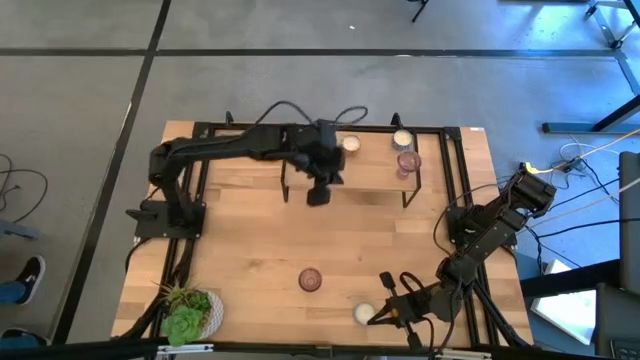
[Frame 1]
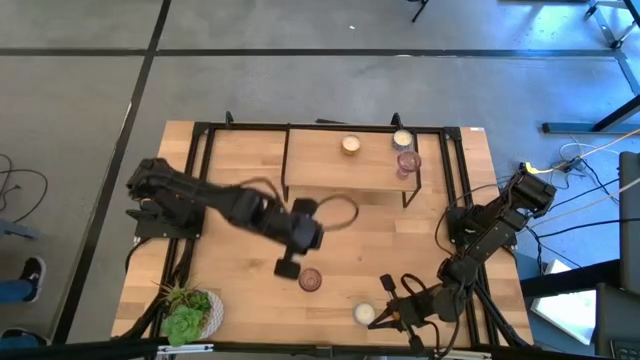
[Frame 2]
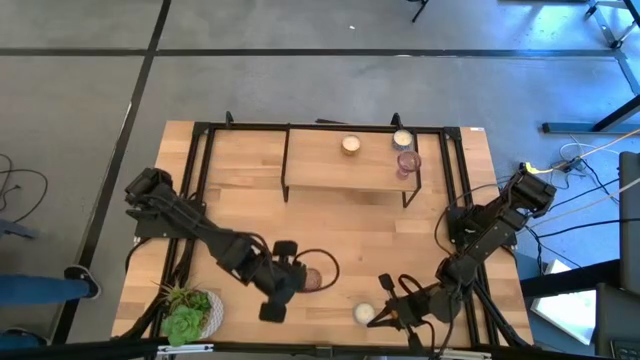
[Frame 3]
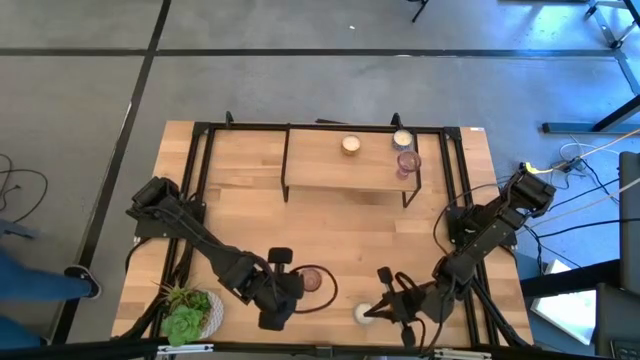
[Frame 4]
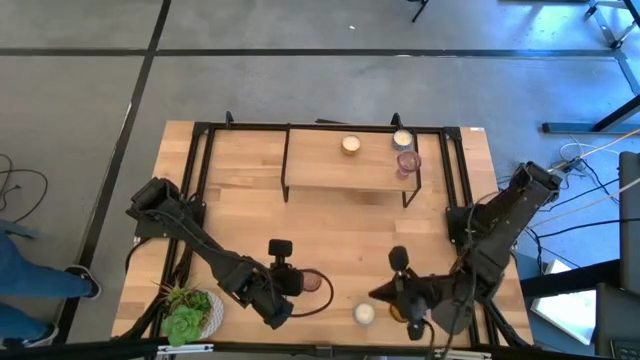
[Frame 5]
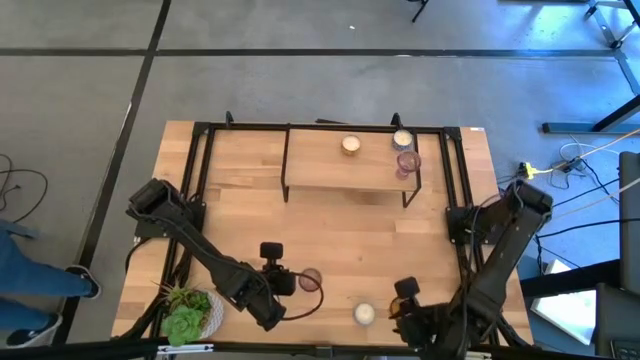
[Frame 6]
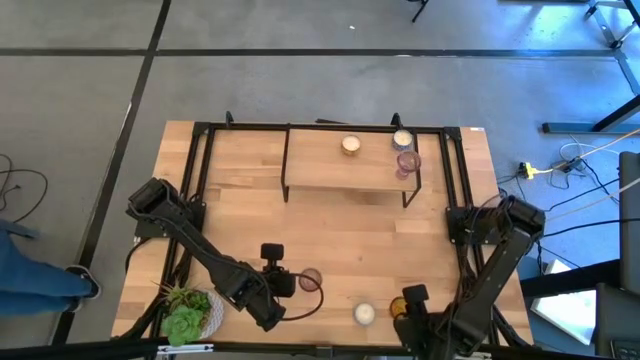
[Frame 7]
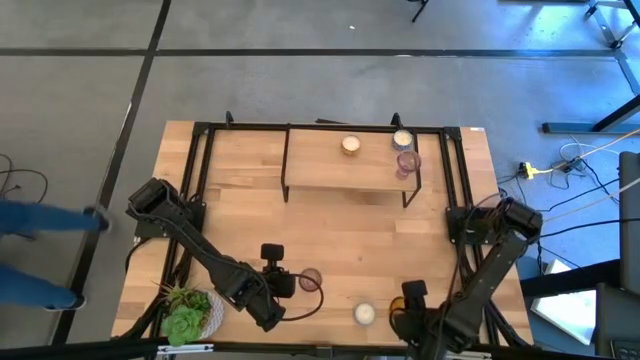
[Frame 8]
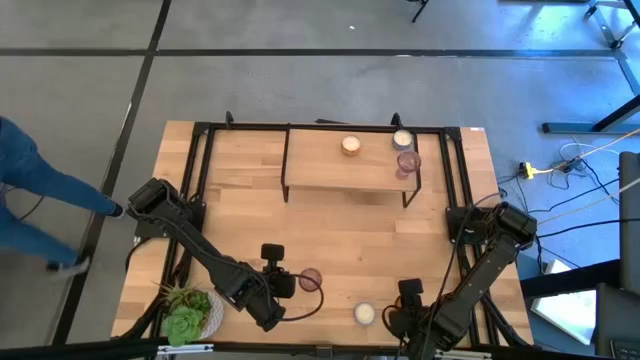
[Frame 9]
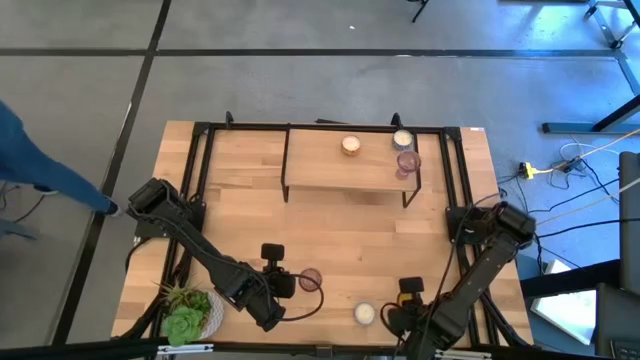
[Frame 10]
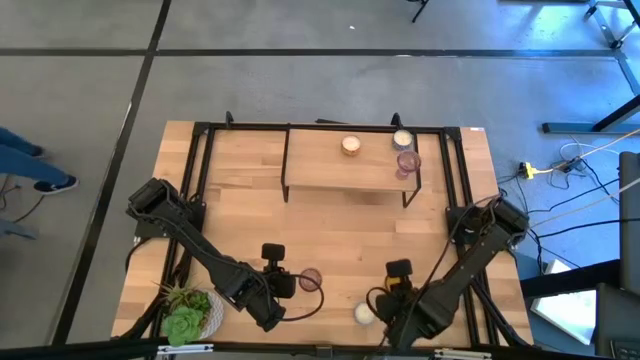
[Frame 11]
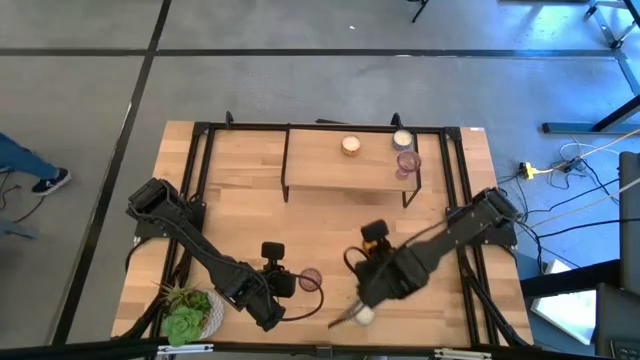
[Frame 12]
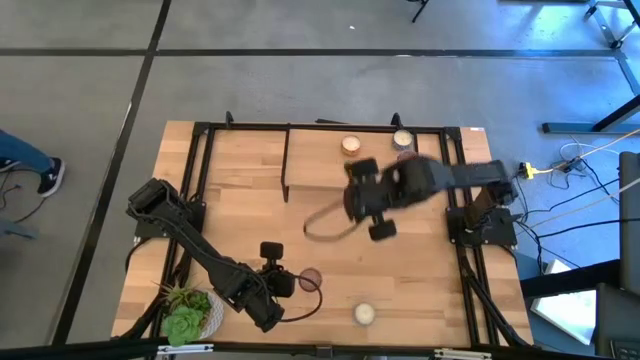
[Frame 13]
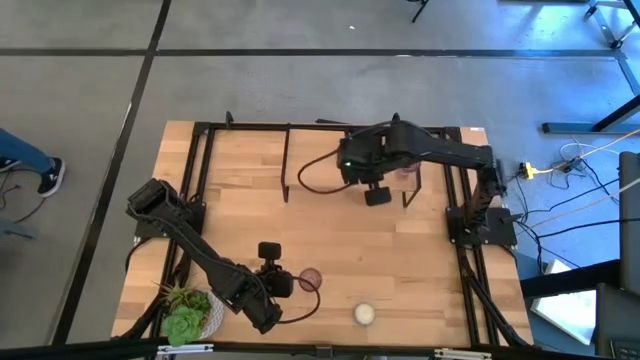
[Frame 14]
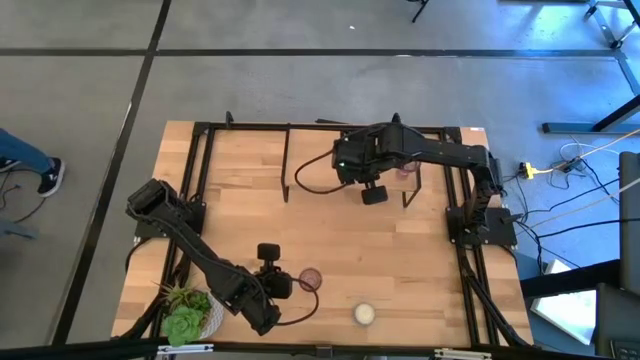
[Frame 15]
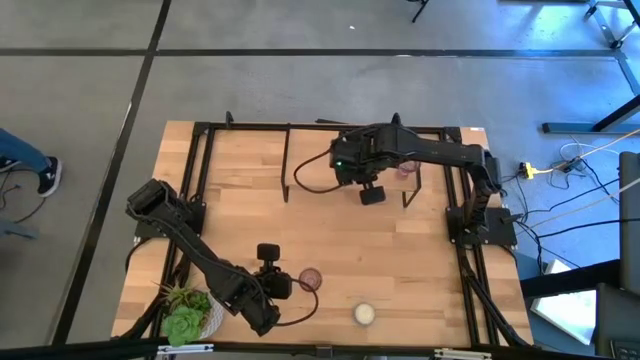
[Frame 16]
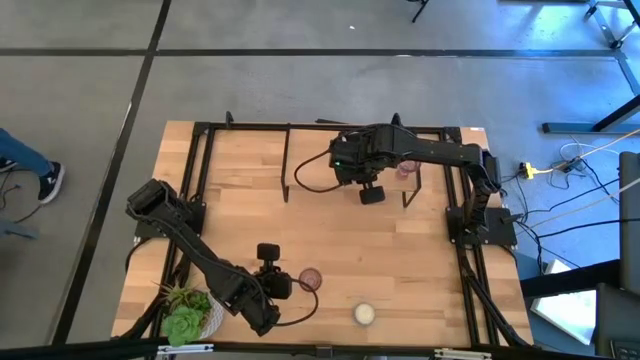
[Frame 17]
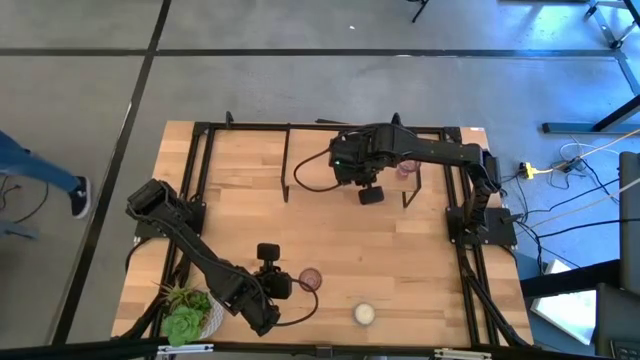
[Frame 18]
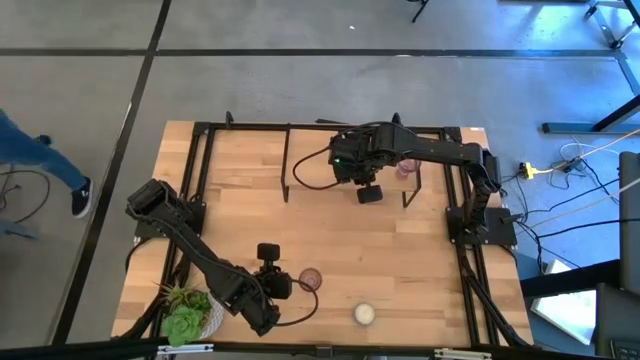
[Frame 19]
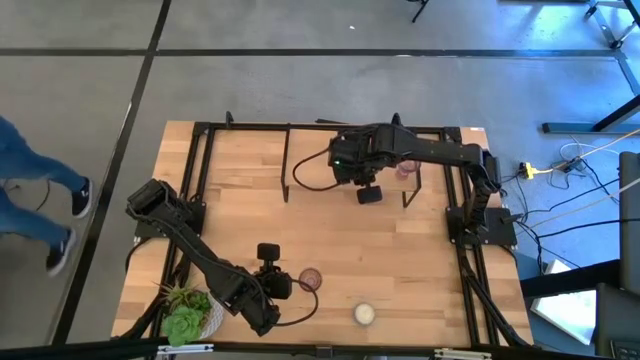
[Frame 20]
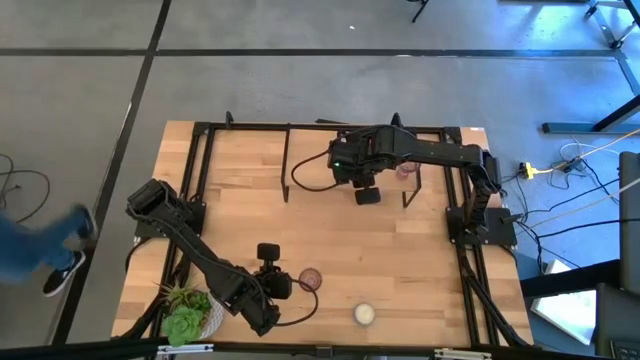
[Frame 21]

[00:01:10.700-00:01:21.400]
Task: Pick & Place candle stick holders
Put the yellow candle holder on the shelf aligned with the yellow candle

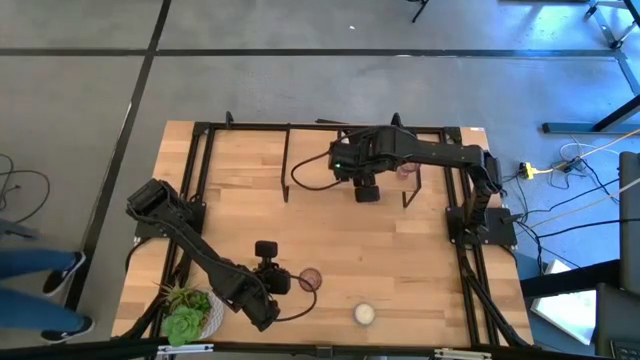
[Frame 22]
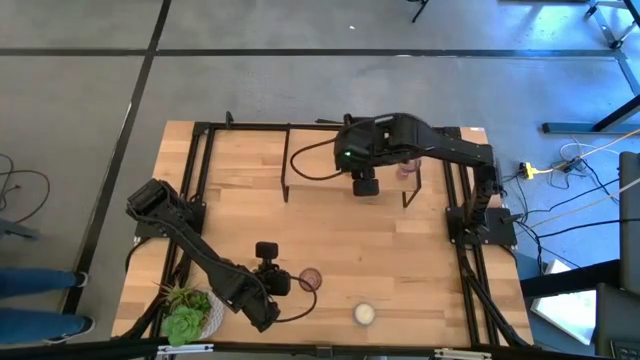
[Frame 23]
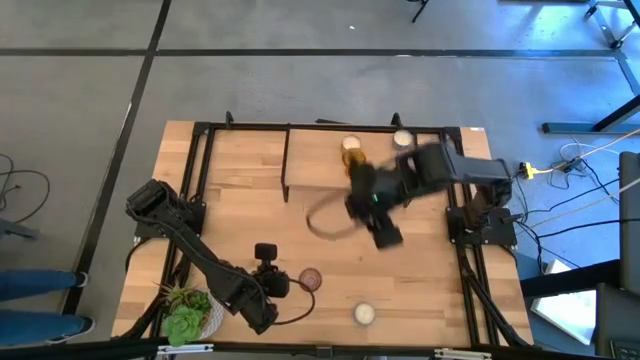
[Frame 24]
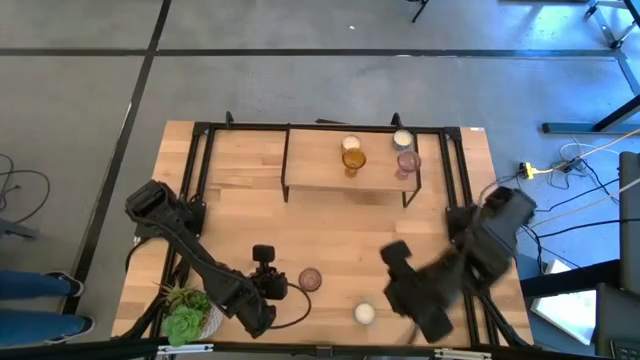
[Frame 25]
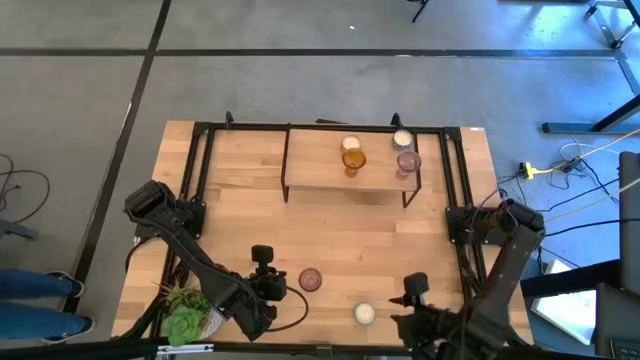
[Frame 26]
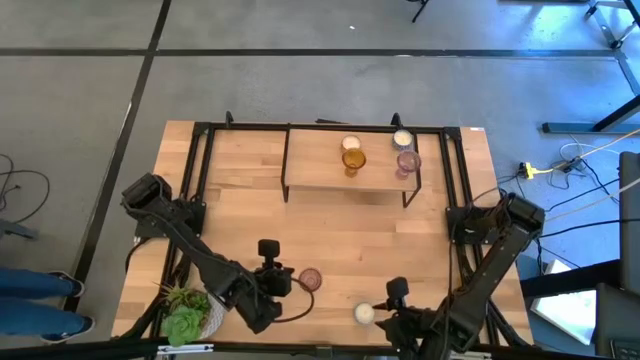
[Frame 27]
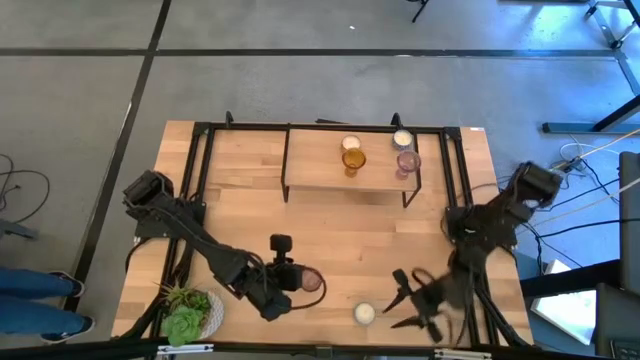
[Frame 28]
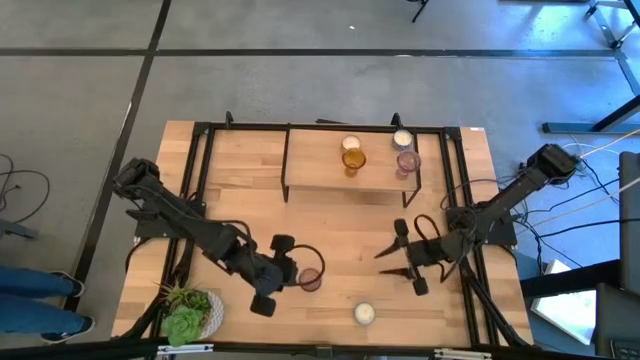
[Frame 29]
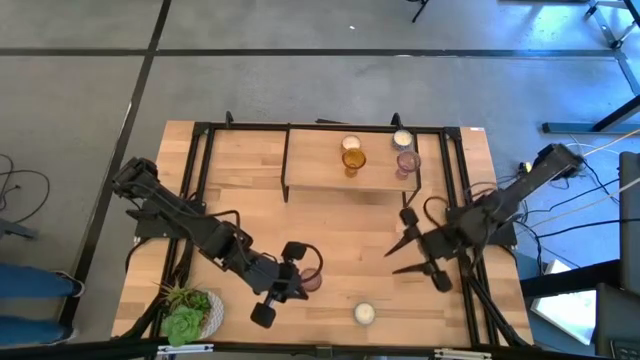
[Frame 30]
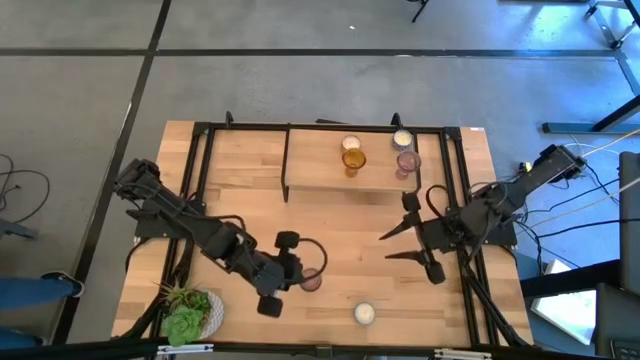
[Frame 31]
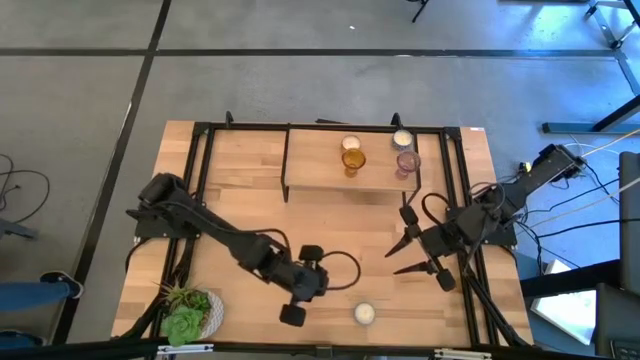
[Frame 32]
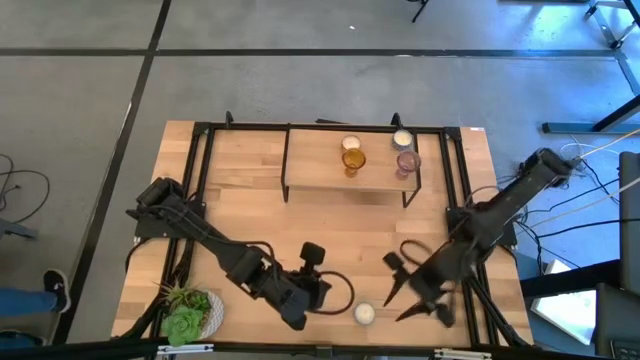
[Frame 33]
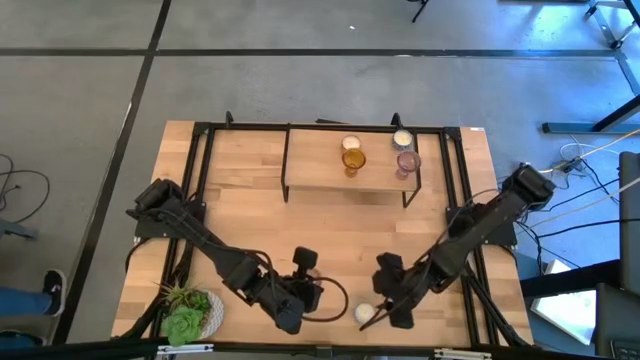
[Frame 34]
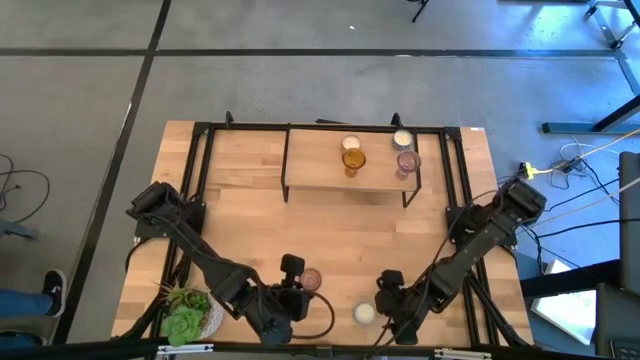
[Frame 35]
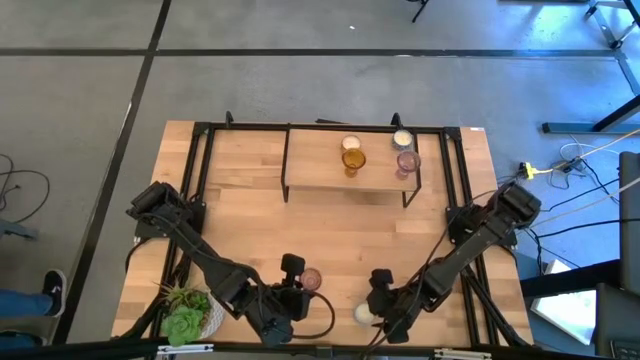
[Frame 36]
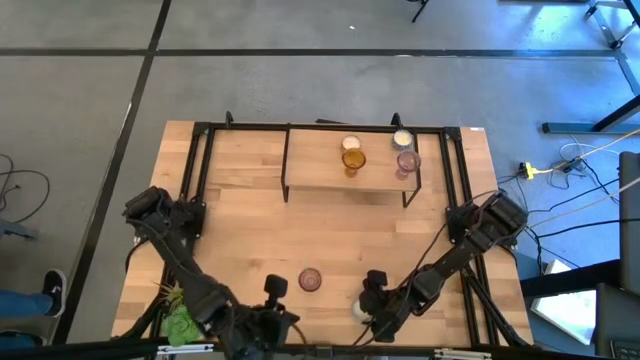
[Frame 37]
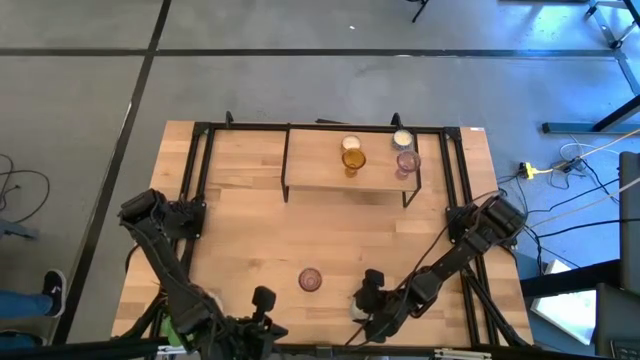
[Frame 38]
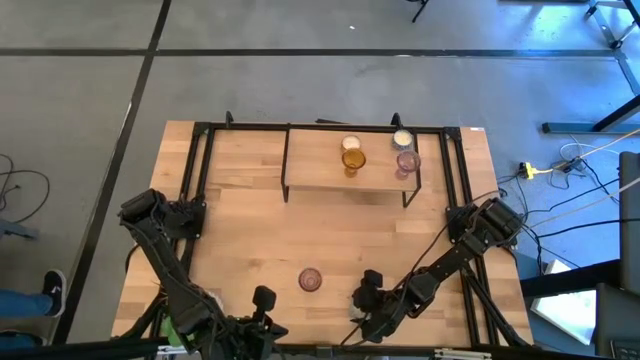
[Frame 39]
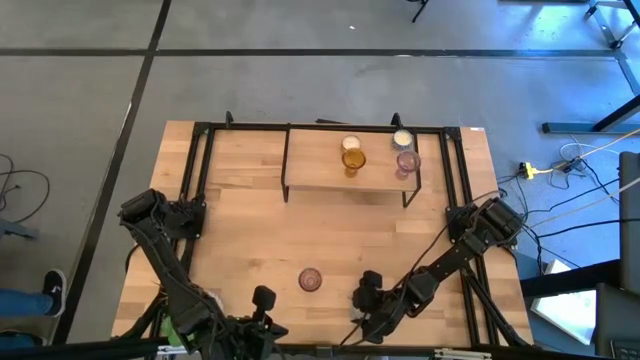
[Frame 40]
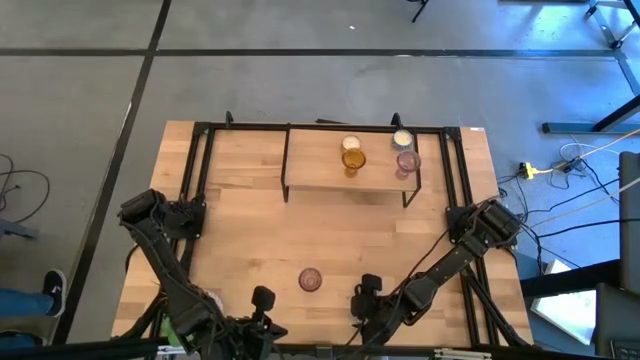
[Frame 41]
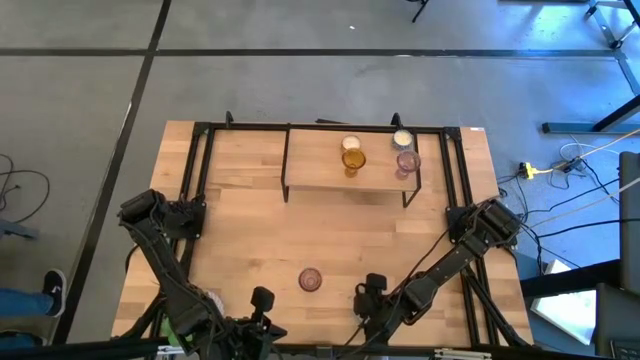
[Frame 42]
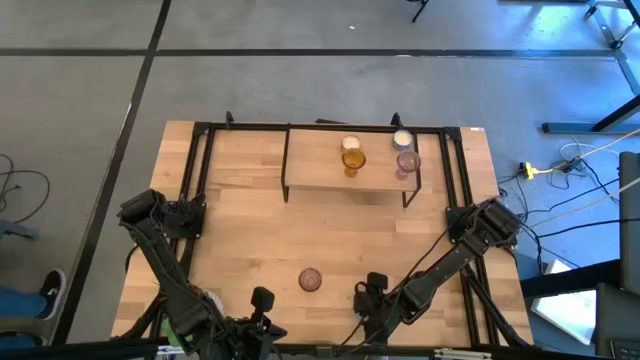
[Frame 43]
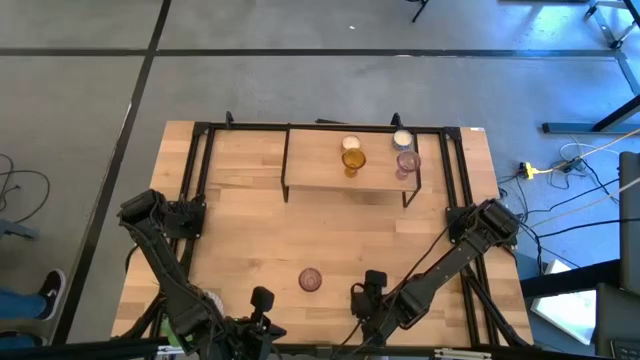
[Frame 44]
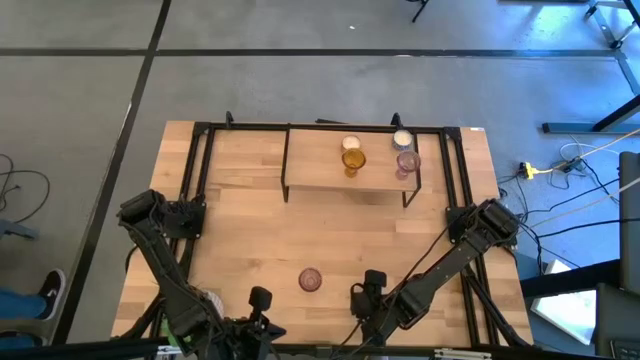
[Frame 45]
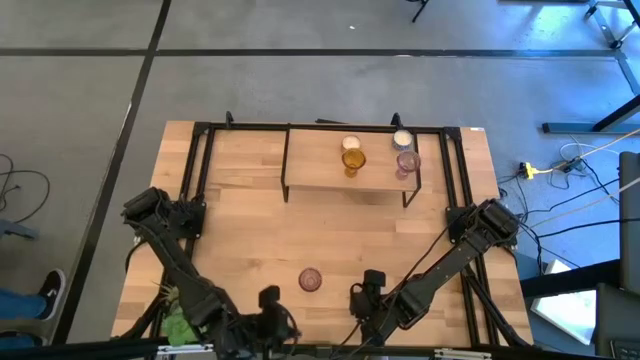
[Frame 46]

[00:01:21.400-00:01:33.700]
Put the light blue candle on the shelf
